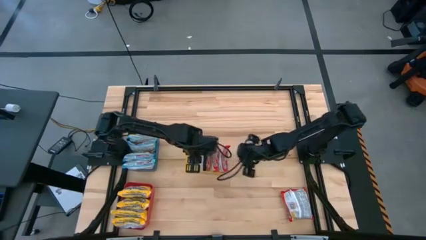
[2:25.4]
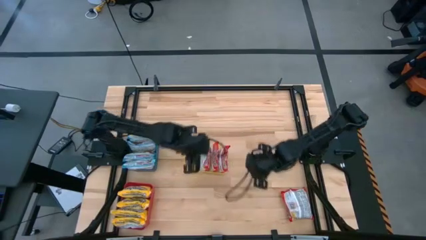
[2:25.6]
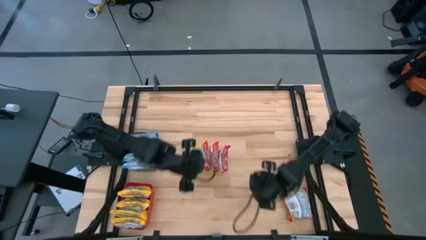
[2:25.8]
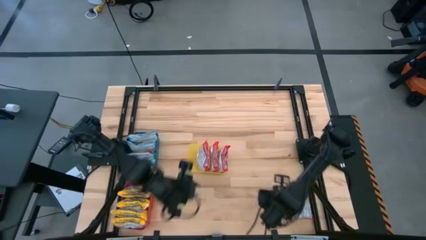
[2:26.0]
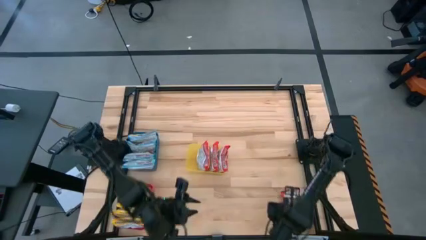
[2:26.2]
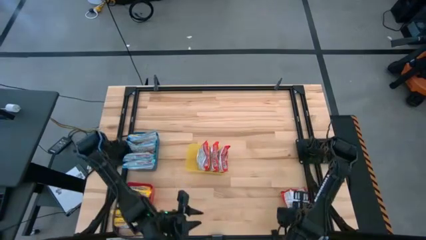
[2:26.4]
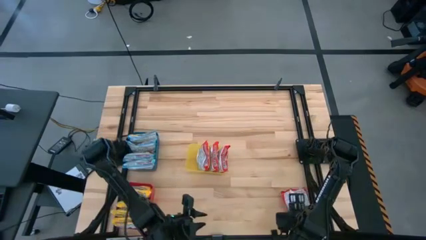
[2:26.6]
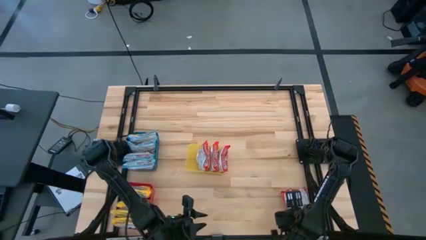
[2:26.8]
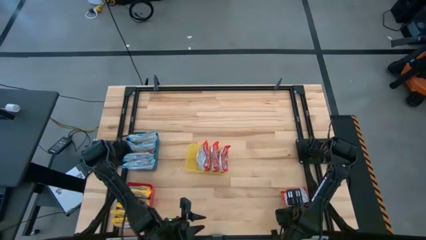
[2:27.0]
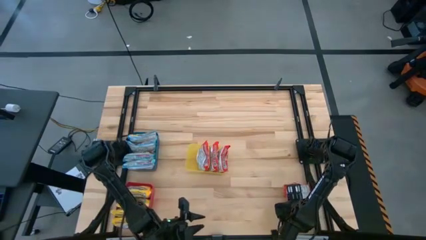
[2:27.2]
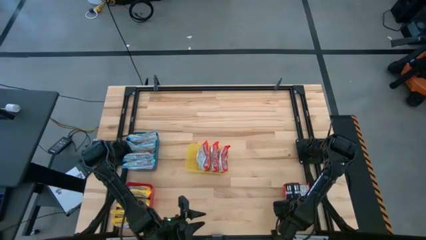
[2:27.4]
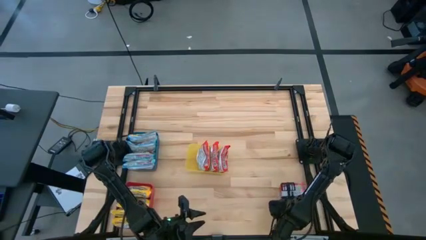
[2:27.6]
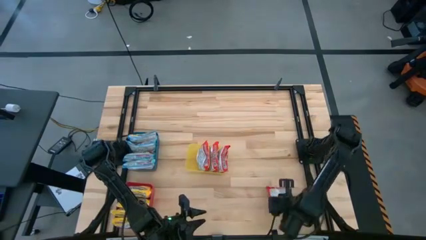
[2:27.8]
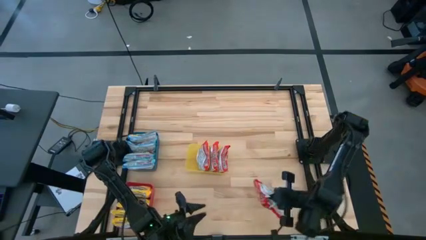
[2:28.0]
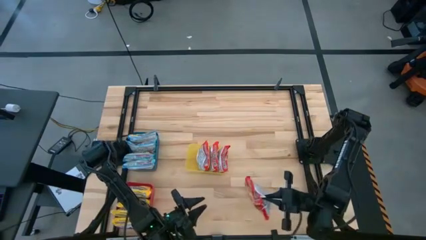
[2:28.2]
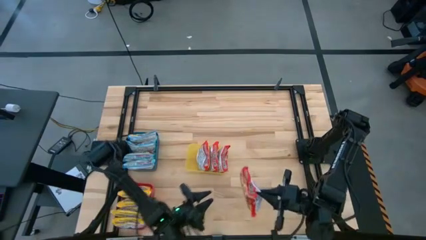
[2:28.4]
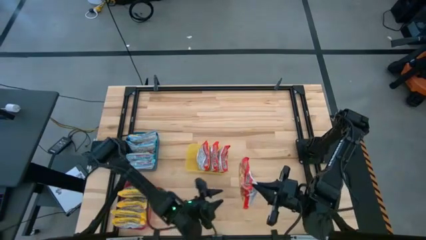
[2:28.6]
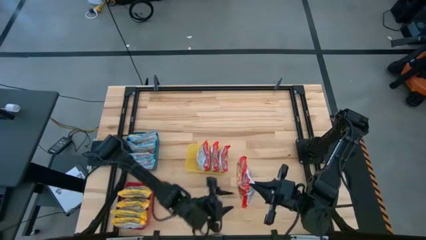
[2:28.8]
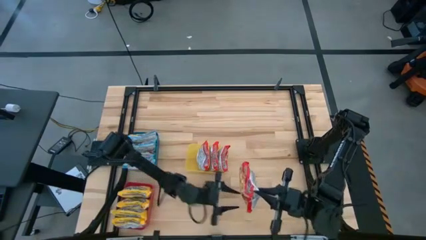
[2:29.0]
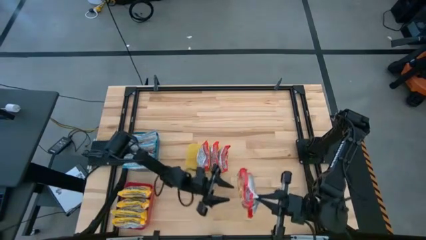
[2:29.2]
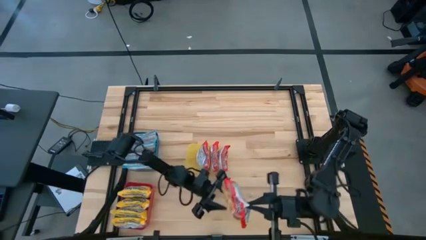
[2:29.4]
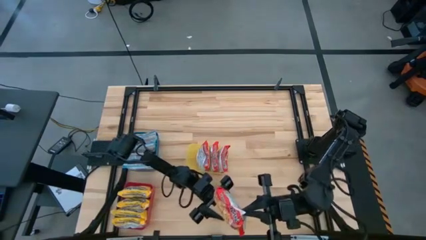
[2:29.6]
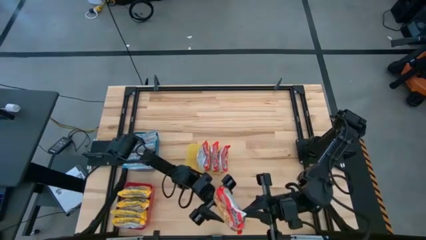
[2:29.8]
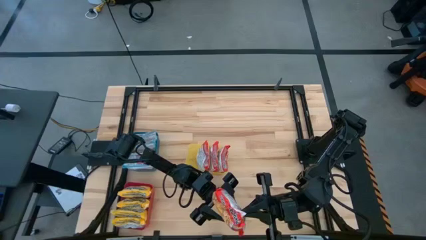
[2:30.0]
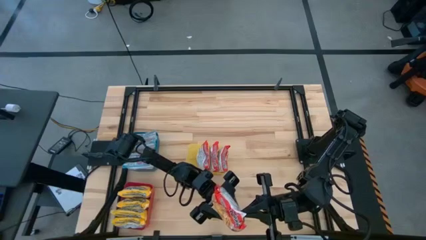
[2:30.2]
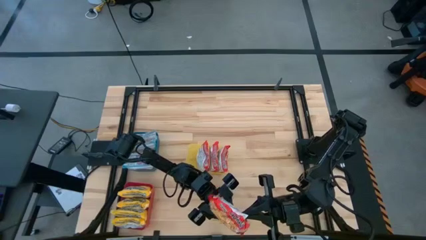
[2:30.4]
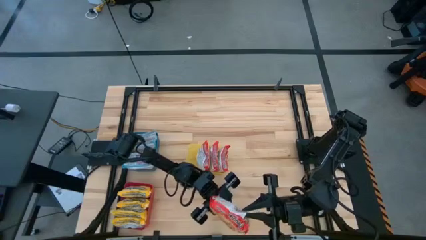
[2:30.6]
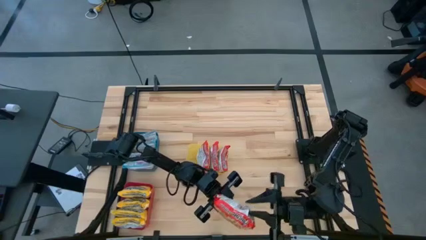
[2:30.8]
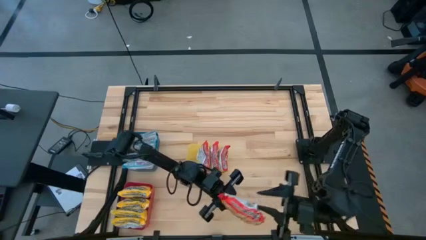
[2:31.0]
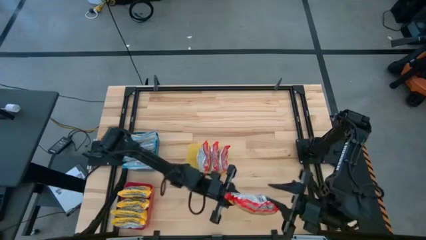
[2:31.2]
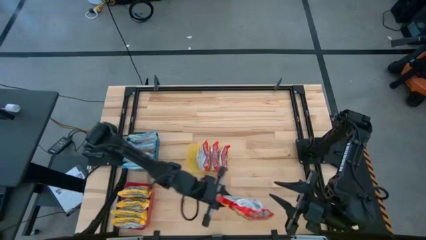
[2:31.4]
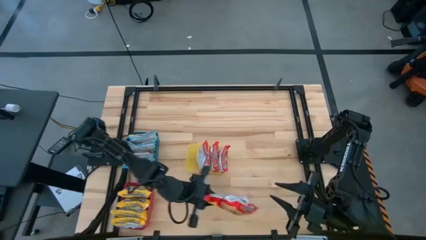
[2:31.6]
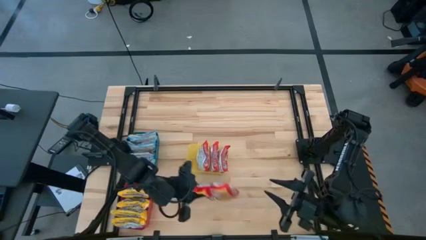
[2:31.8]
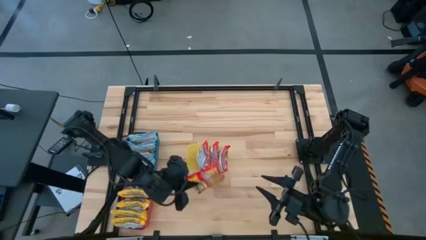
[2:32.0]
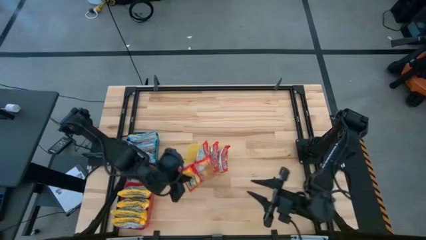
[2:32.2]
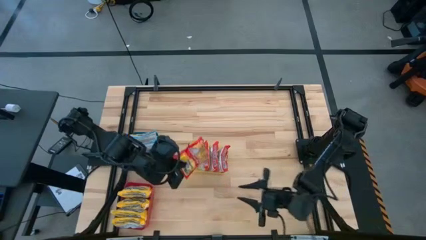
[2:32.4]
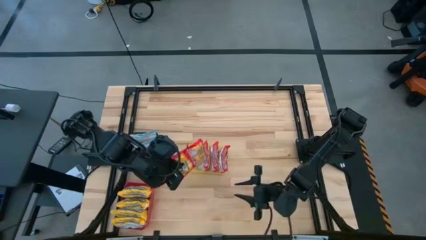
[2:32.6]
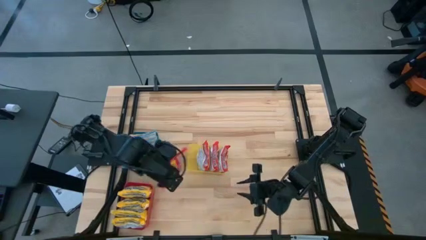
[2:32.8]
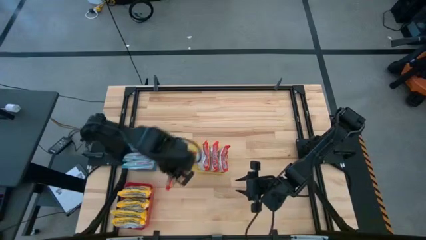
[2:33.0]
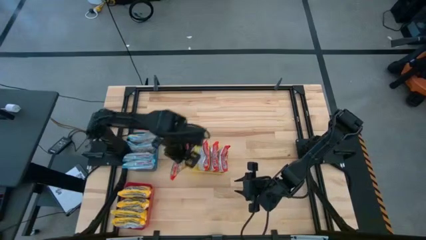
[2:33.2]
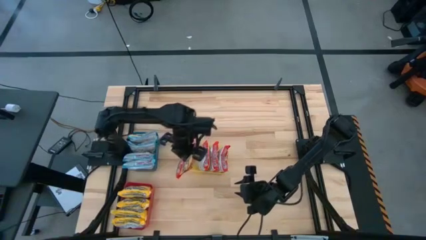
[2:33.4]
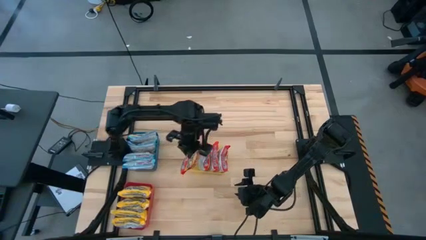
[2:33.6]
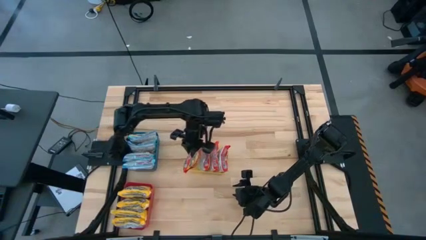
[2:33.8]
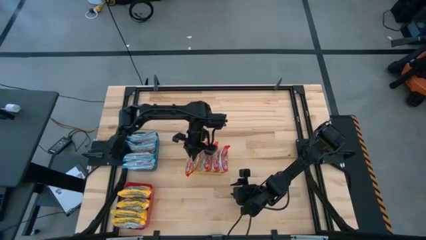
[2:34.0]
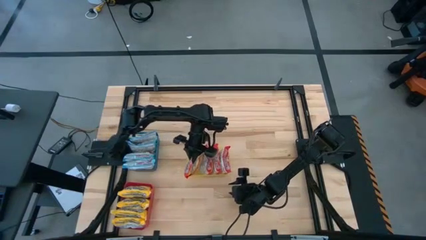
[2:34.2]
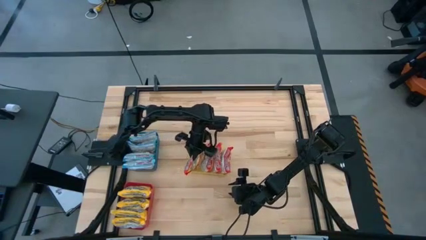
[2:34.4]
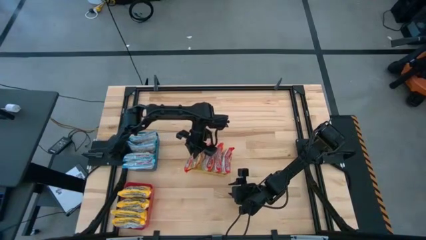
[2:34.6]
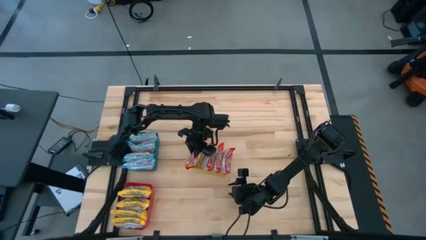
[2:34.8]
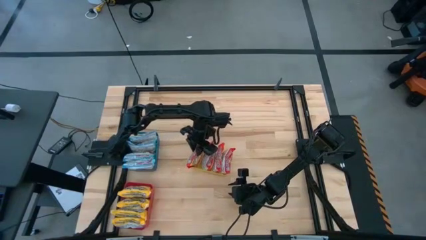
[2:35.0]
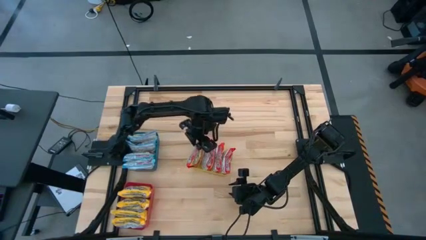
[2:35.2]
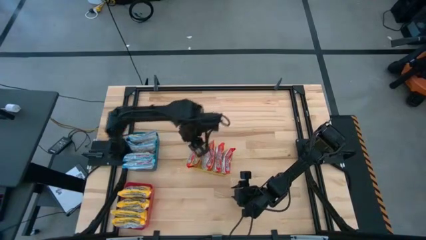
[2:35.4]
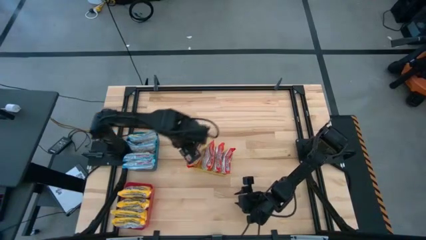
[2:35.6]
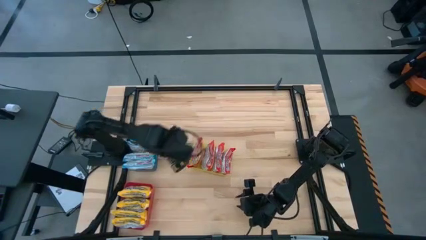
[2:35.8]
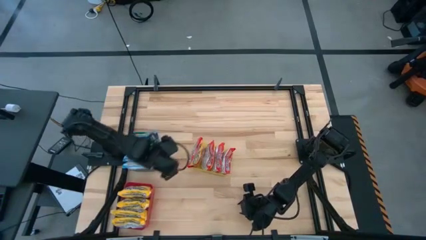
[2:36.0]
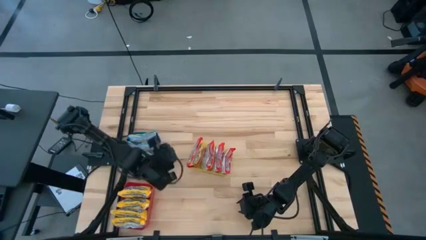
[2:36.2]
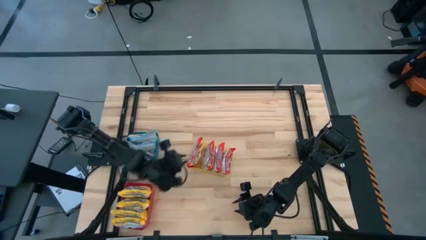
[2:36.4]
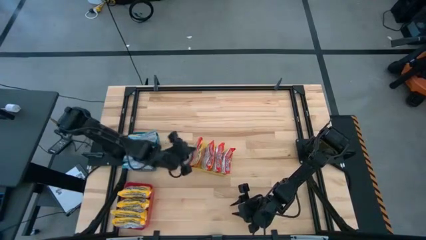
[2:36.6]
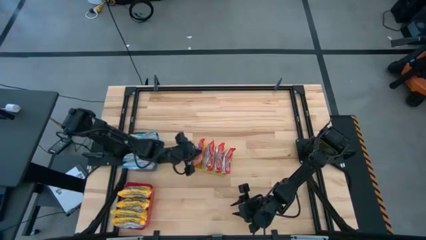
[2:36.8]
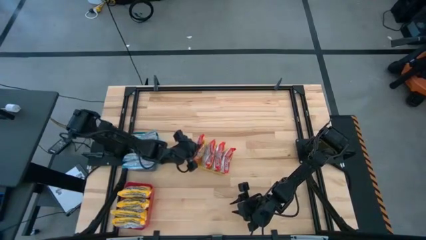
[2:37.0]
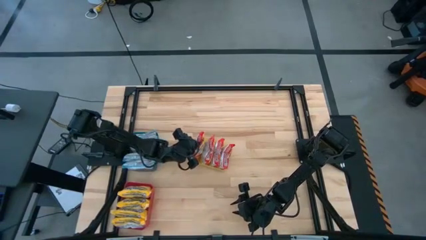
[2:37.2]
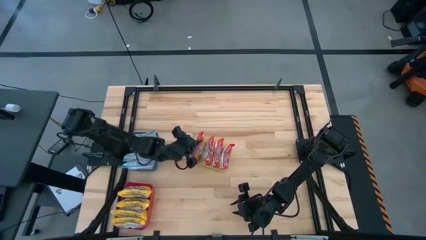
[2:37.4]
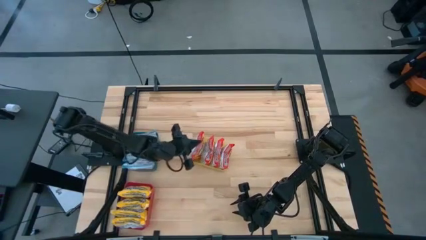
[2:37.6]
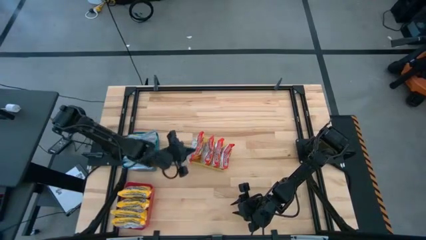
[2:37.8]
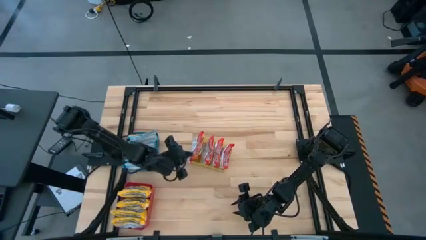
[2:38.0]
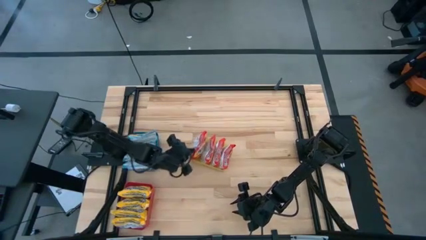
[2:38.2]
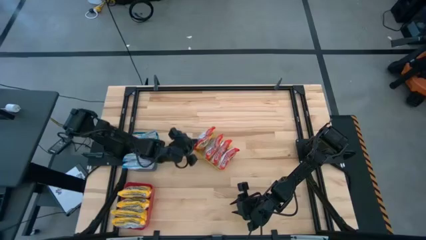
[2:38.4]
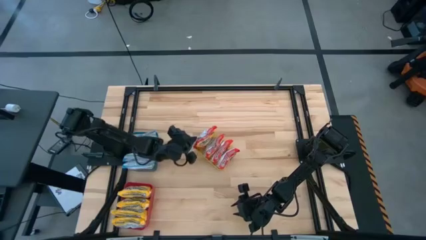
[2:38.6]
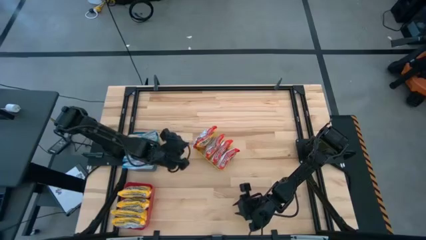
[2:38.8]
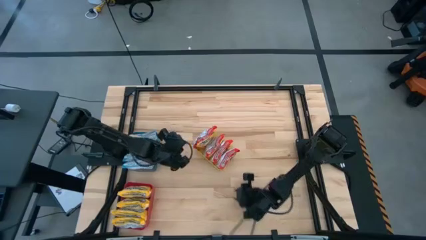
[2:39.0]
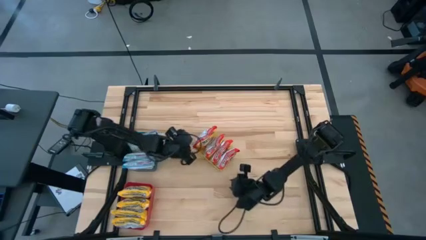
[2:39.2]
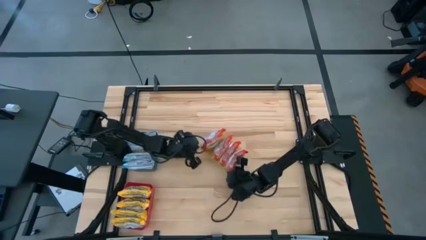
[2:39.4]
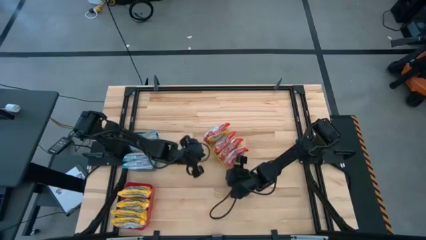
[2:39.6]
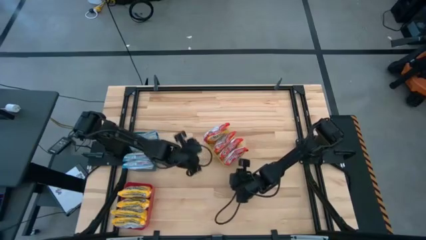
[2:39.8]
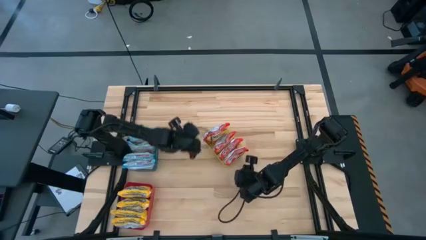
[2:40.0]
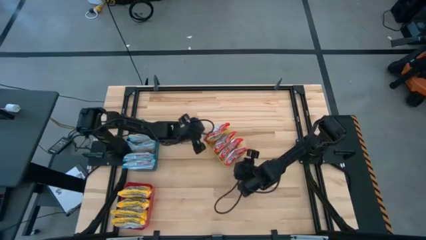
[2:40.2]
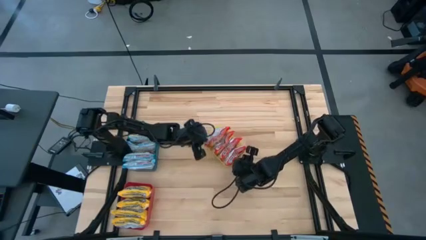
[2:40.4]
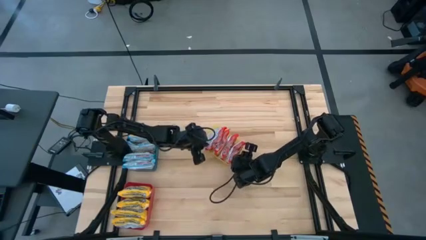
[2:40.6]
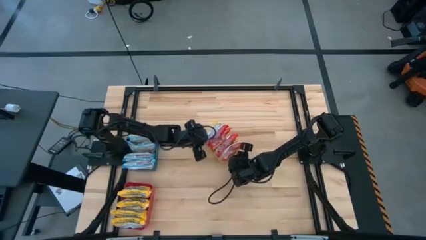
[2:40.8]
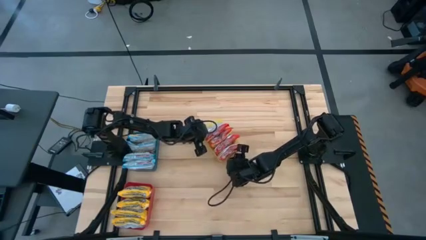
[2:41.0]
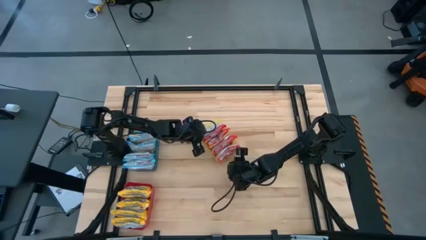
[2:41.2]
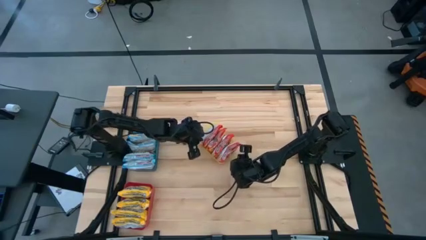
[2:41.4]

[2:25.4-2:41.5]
Task: Sort Maruchan noodles
Put the red noodle pack into the yellow bin
